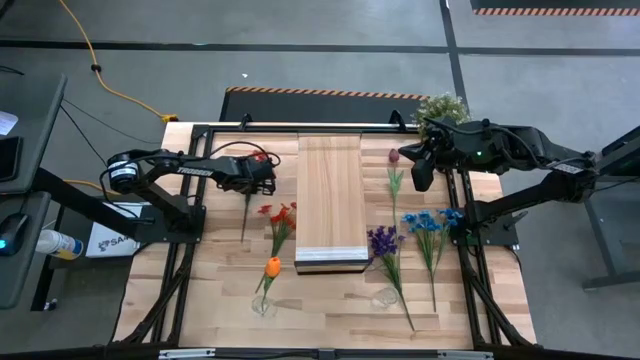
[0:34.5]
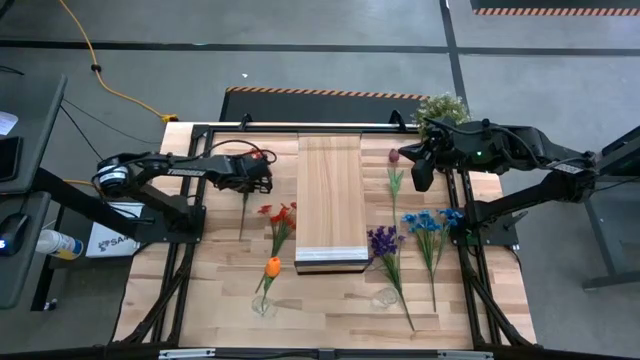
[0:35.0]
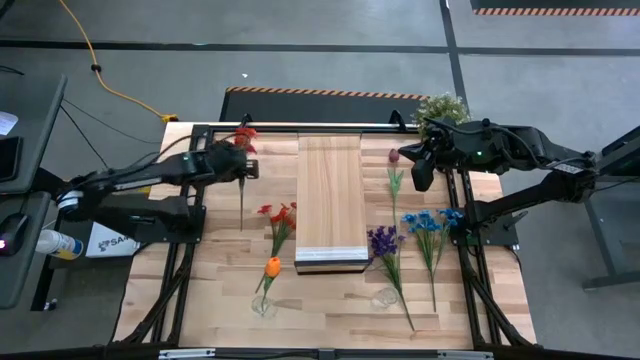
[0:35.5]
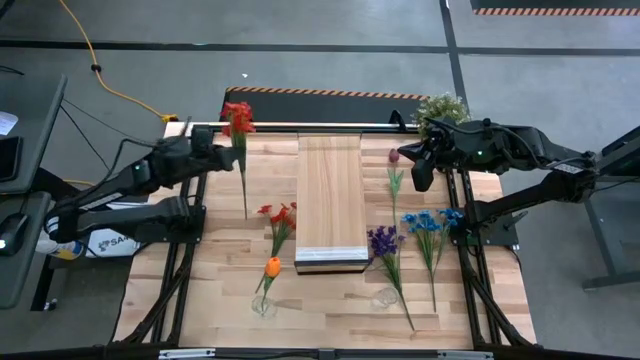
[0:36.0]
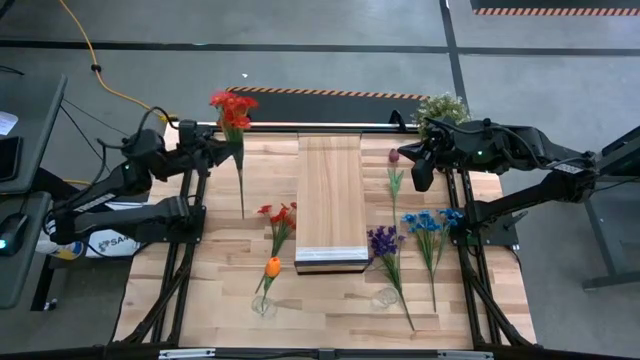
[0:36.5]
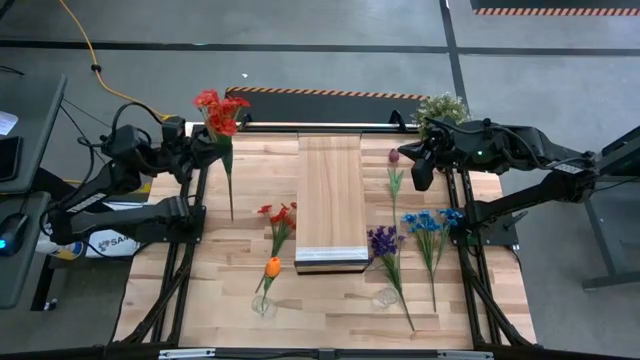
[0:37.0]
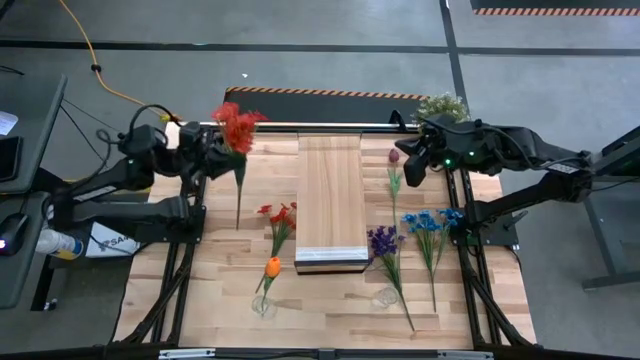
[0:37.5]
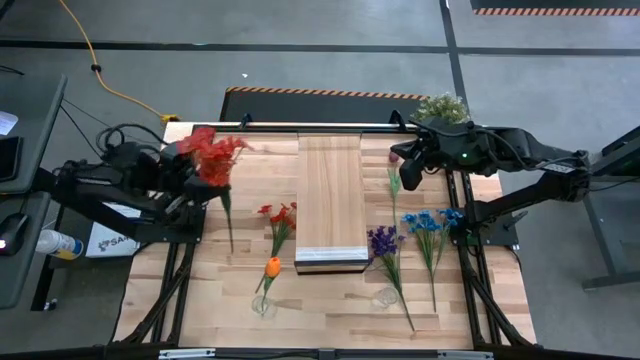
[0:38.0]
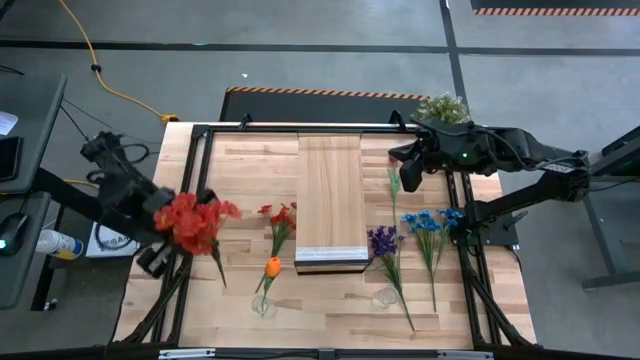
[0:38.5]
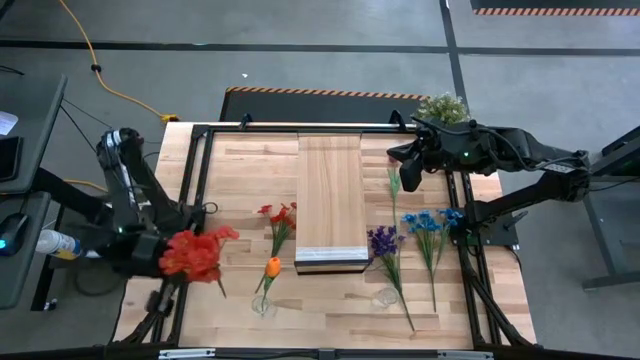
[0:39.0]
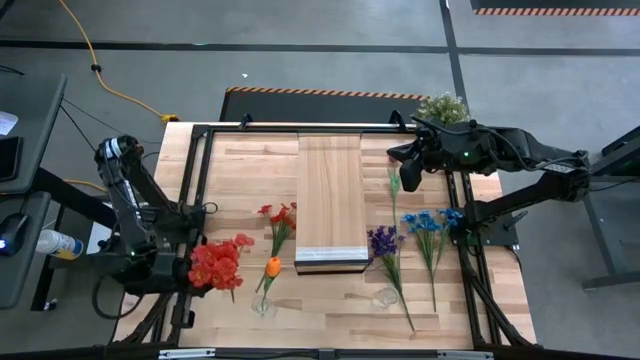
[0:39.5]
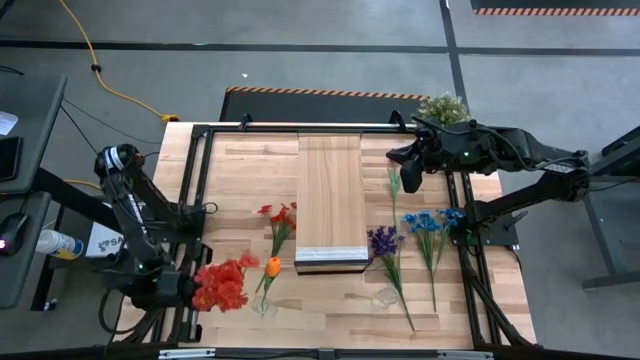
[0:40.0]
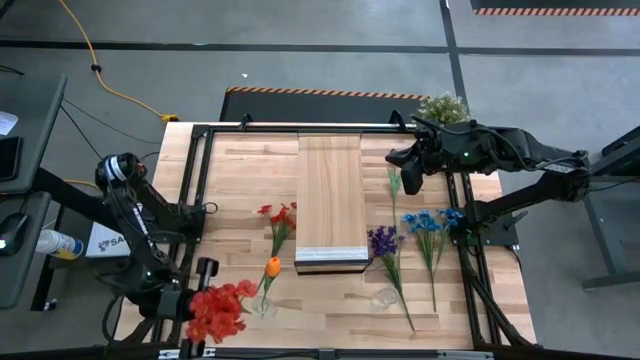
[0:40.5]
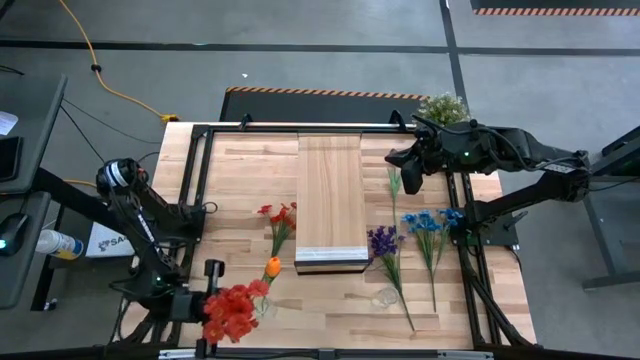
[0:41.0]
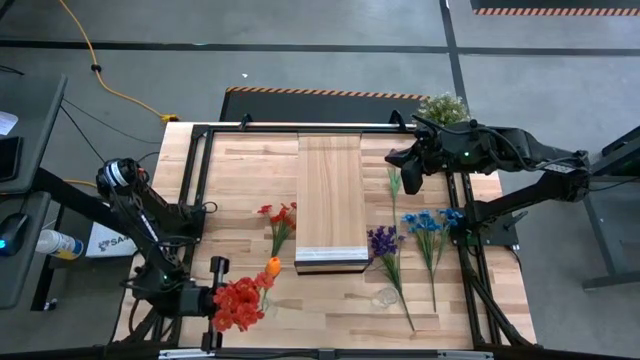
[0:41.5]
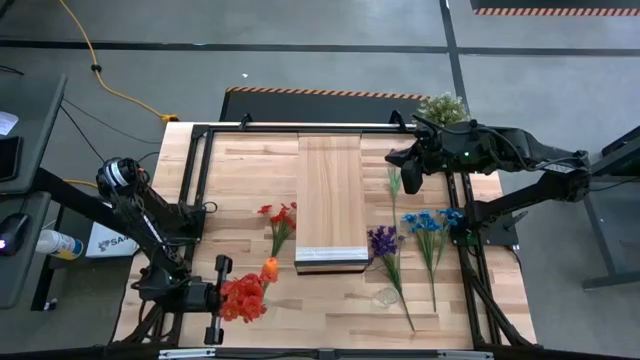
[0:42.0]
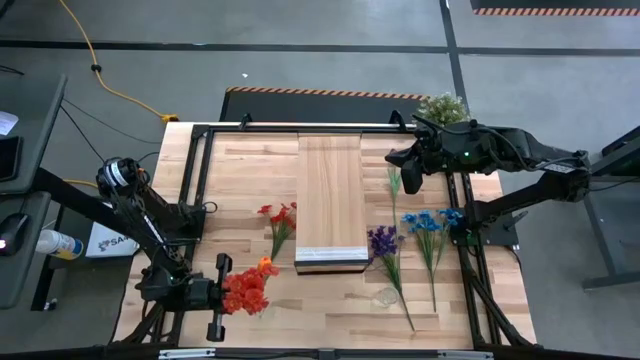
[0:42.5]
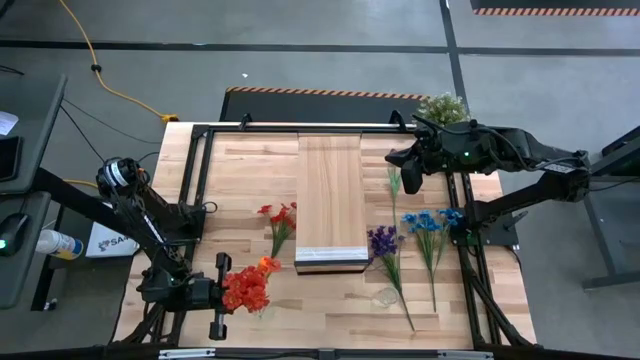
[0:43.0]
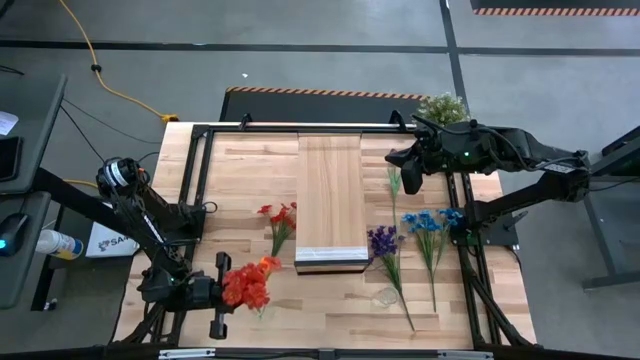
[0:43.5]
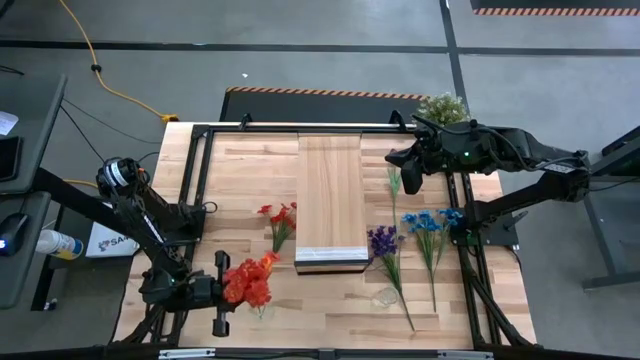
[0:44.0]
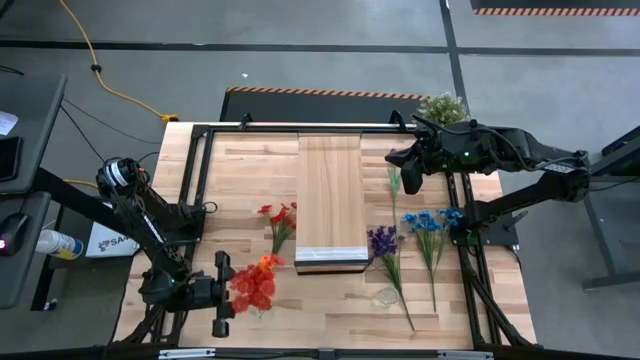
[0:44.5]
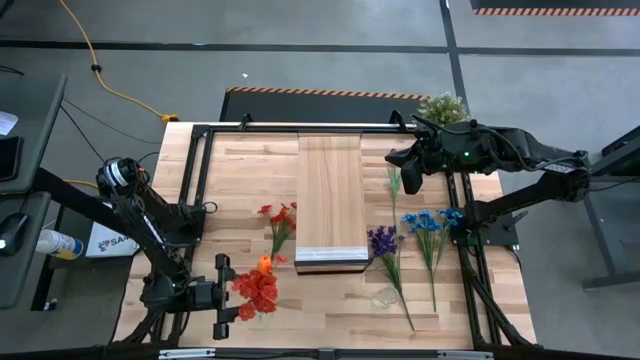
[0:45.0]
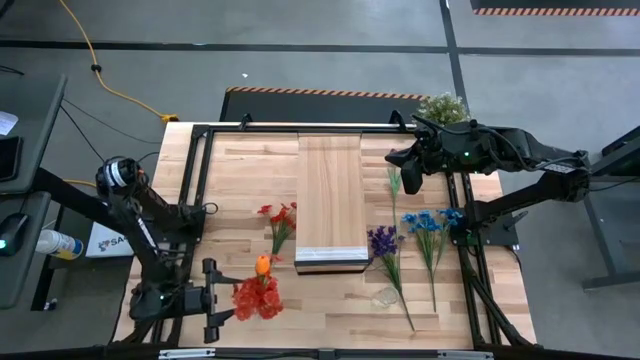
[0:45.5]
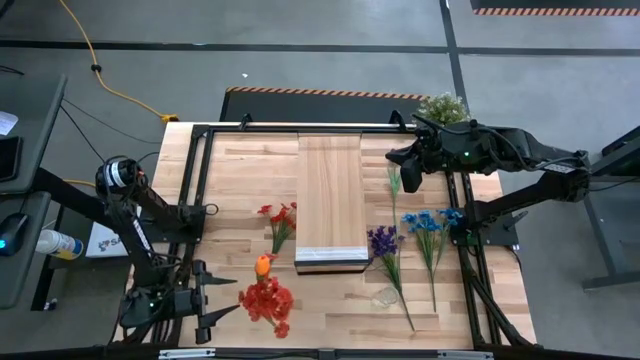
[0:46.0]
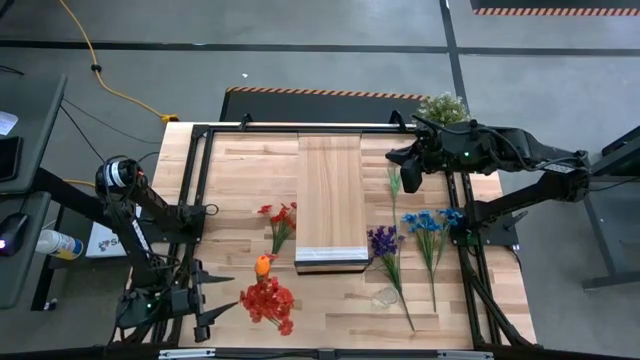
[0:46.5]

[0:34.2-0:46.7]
Task: Pick and place flowers into a vace then onto a shelf
Put the top red flowers into the left transparent vase

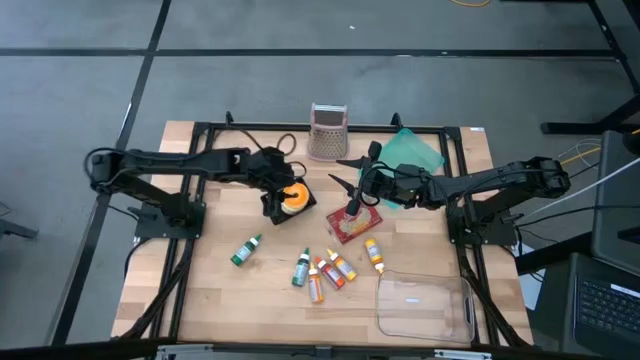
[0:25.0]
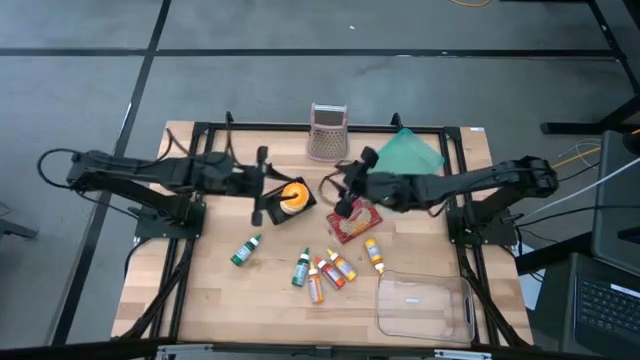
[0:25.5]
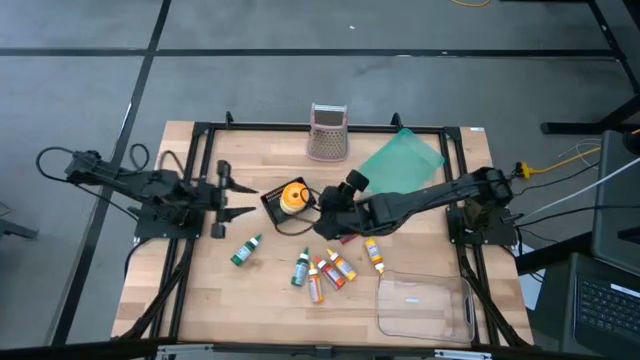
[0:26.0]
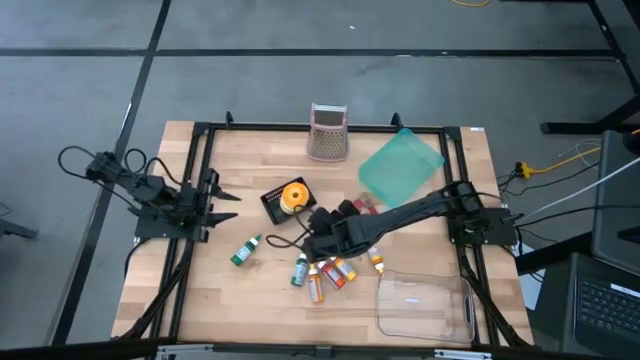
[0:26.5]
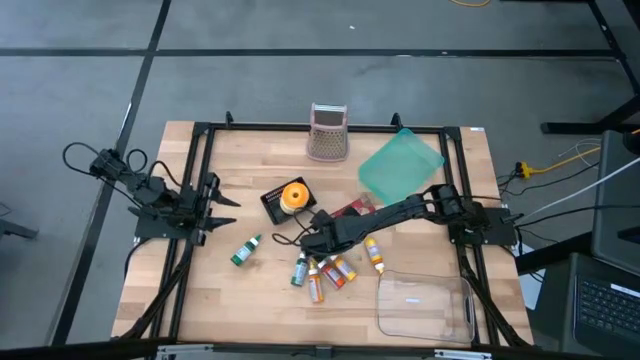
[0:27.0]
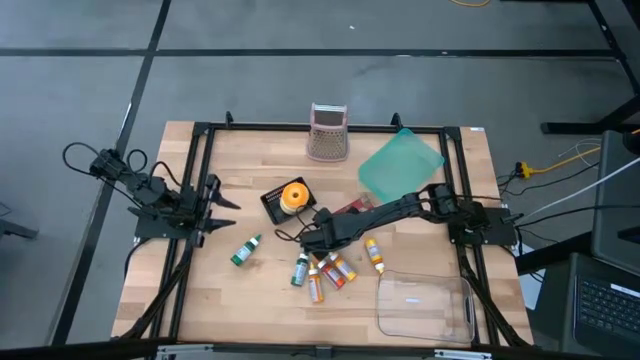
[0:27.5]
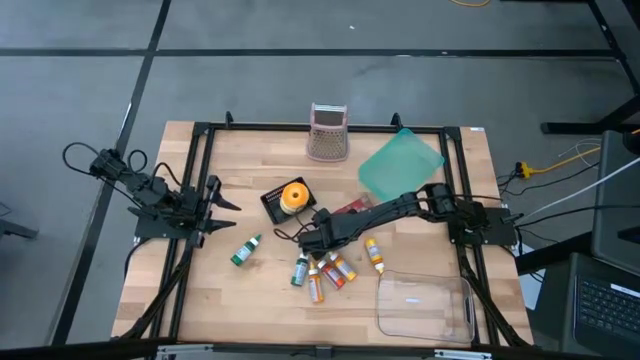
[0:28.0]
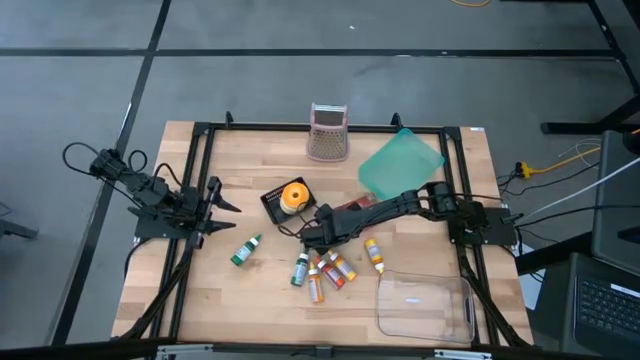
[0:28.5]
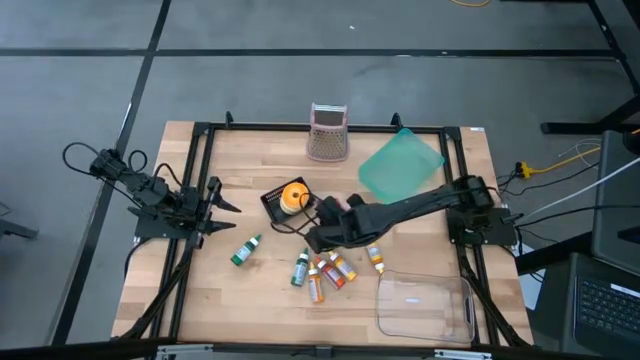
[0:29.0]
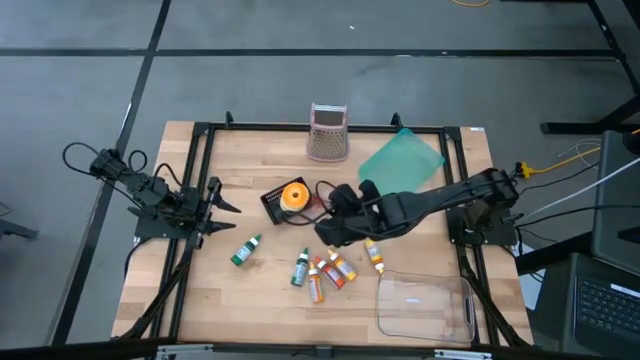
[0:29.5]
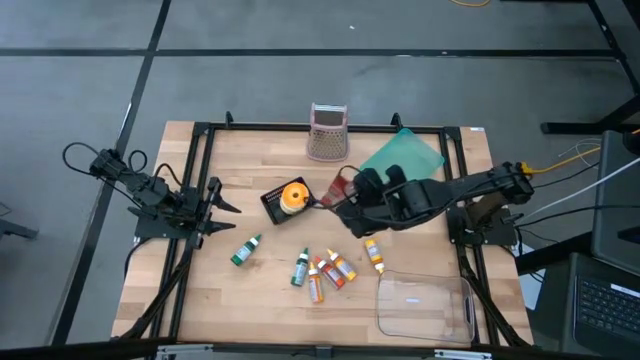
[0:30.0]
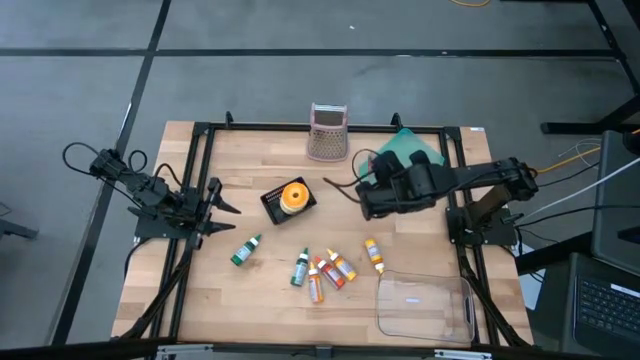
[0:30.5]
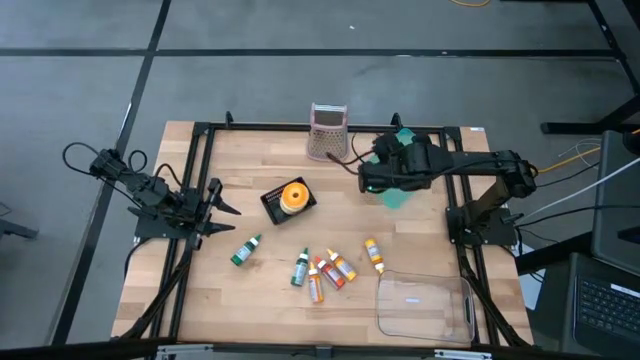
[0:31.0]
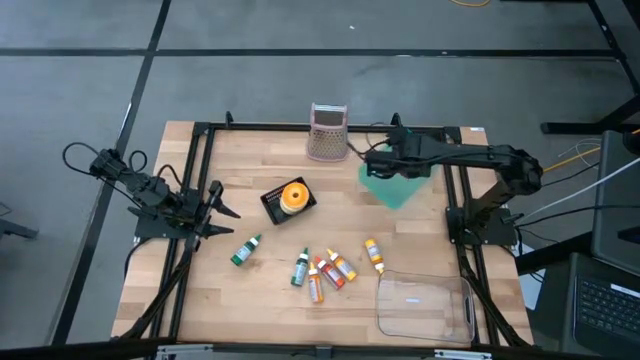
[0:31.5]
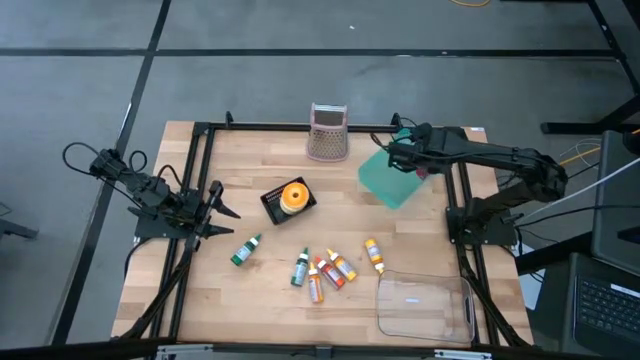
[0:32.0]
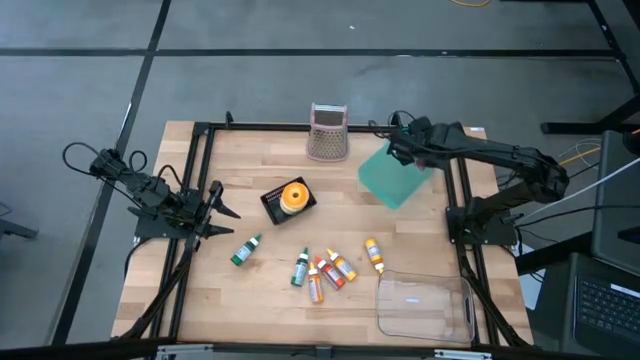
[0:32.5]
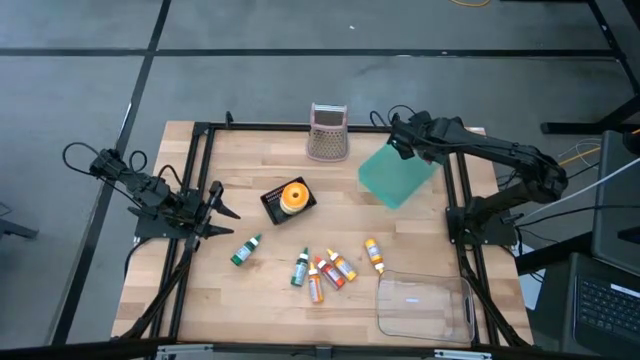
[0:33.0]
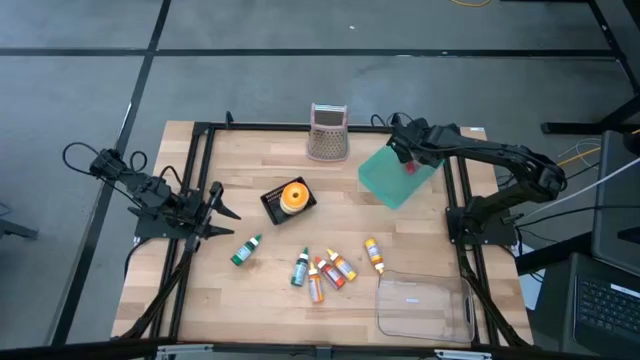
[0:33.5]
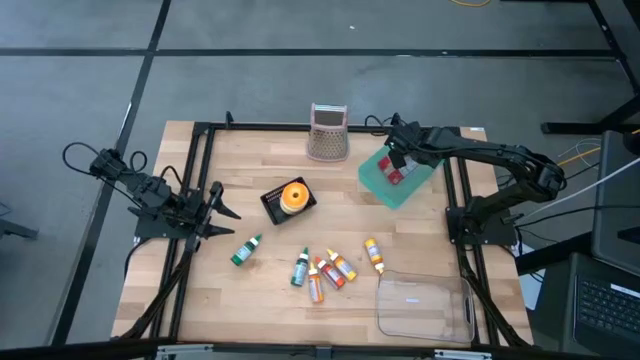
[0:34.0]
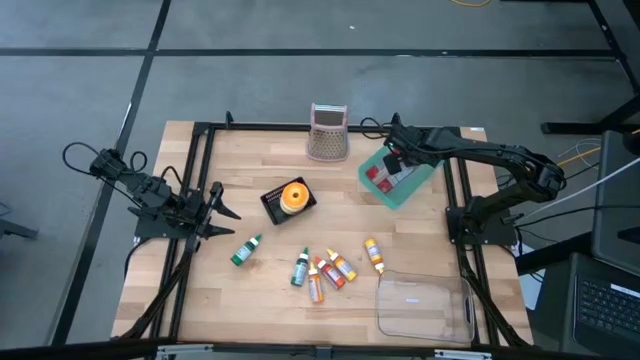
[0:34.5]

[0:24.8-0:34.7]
Task: Pick & Place Food Item
Put the red popcorn into the green bin
